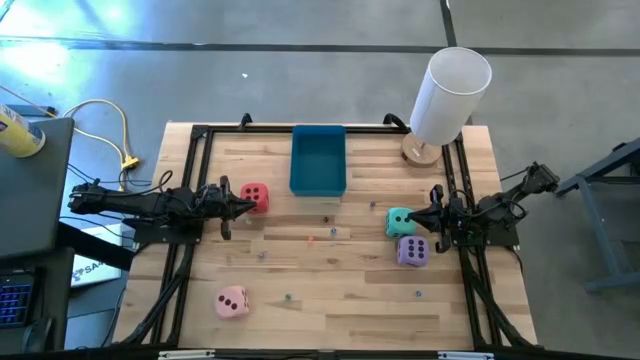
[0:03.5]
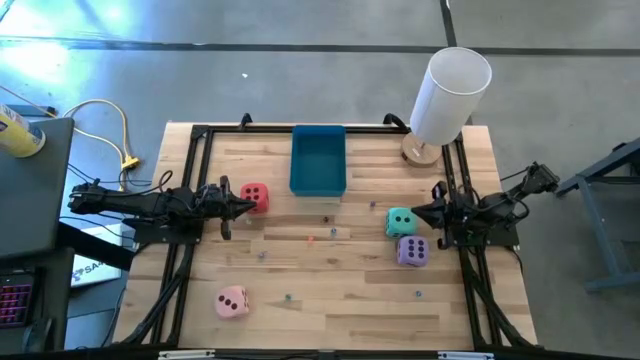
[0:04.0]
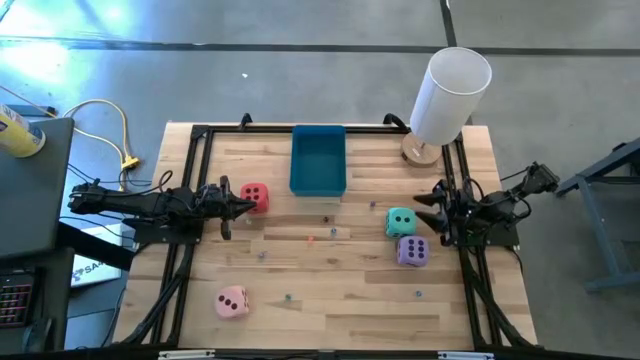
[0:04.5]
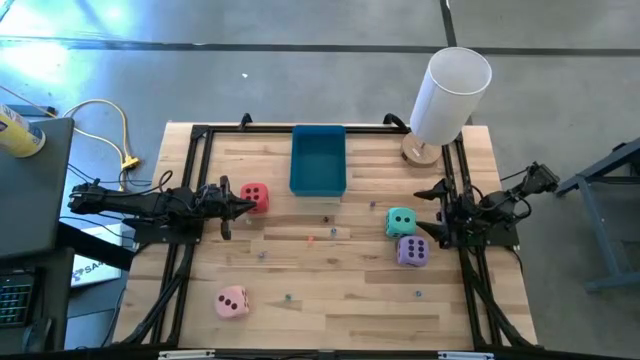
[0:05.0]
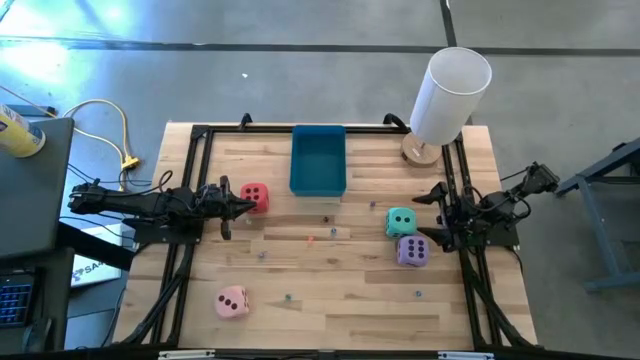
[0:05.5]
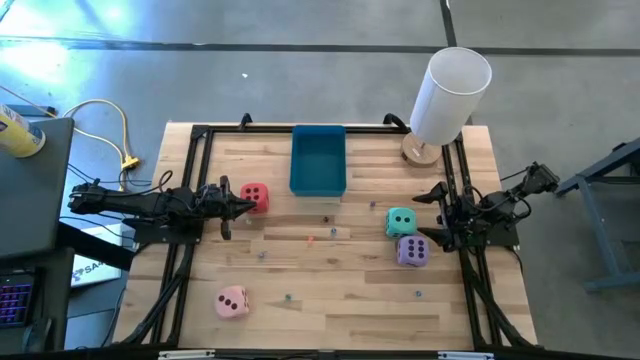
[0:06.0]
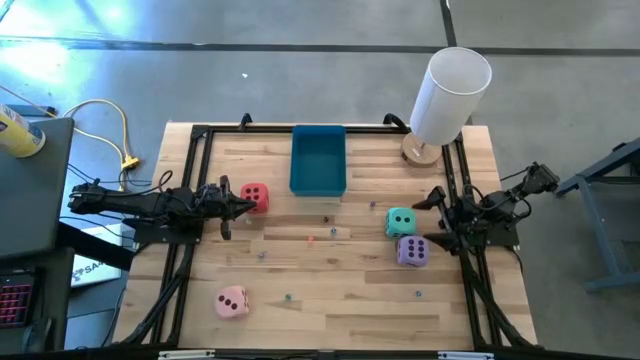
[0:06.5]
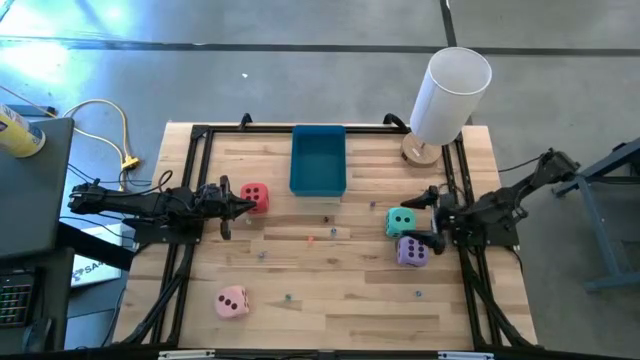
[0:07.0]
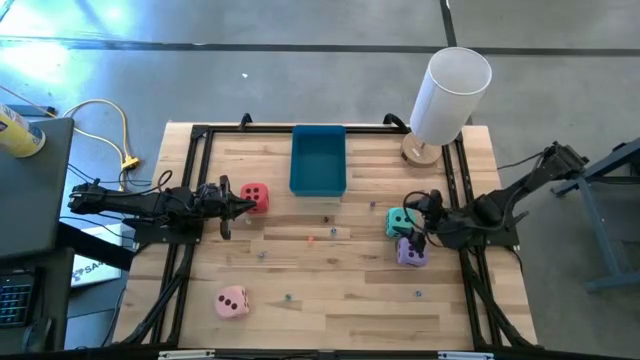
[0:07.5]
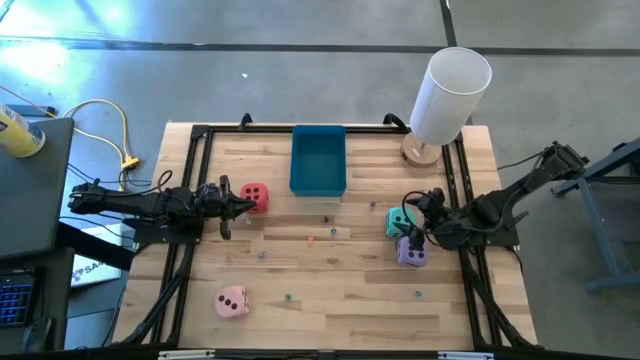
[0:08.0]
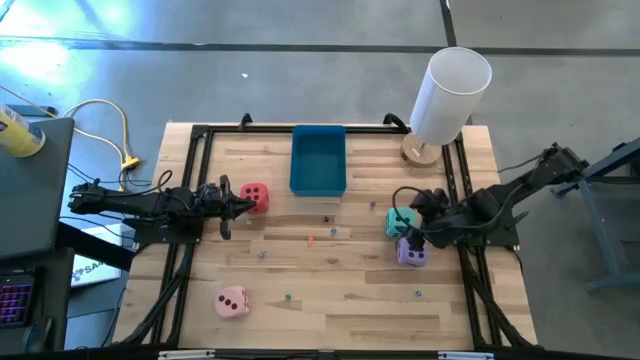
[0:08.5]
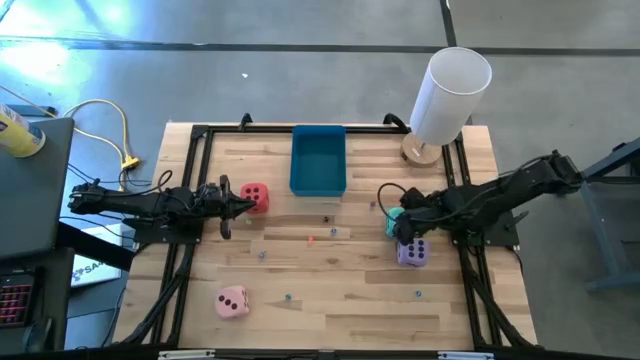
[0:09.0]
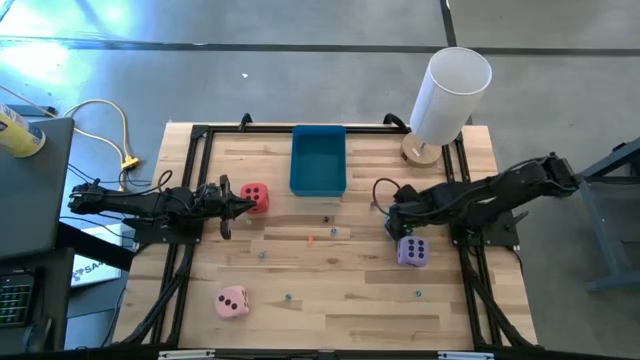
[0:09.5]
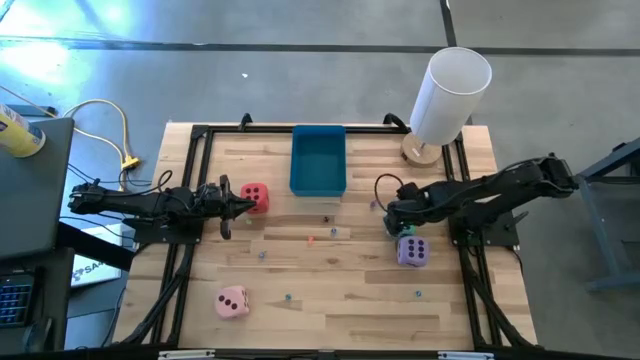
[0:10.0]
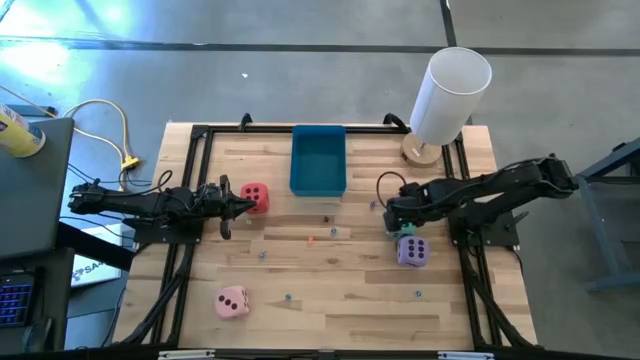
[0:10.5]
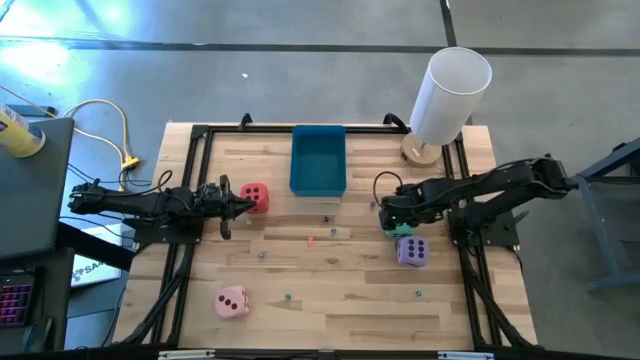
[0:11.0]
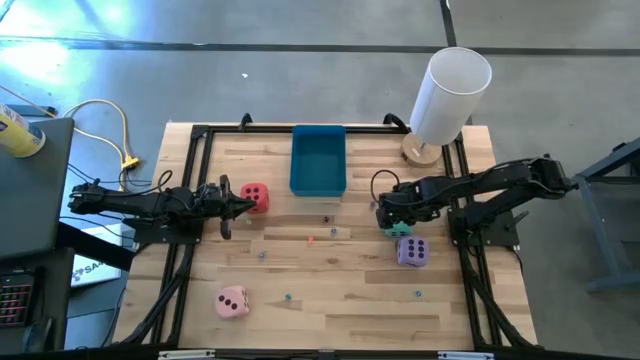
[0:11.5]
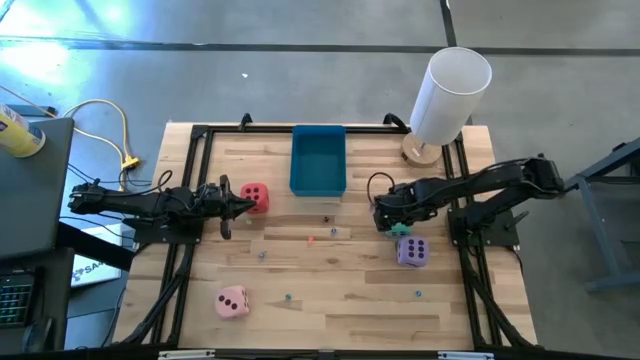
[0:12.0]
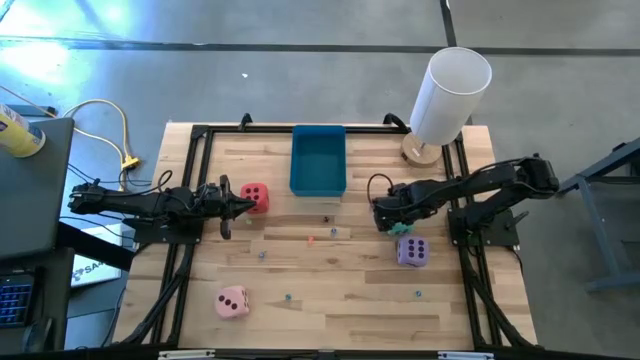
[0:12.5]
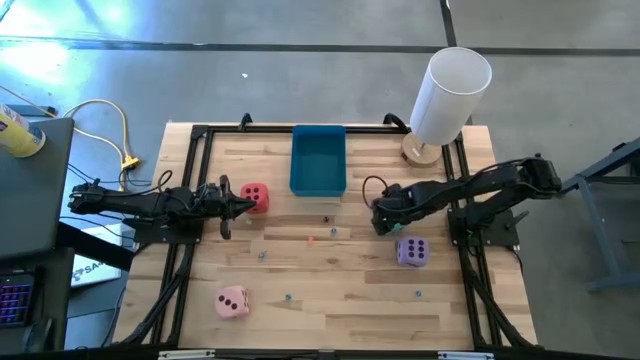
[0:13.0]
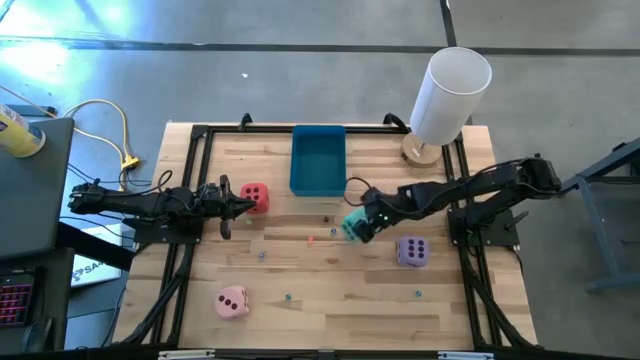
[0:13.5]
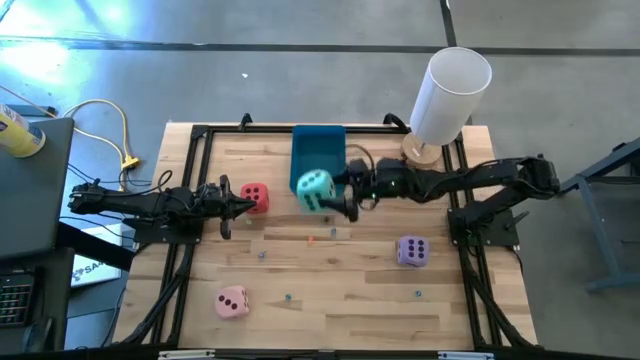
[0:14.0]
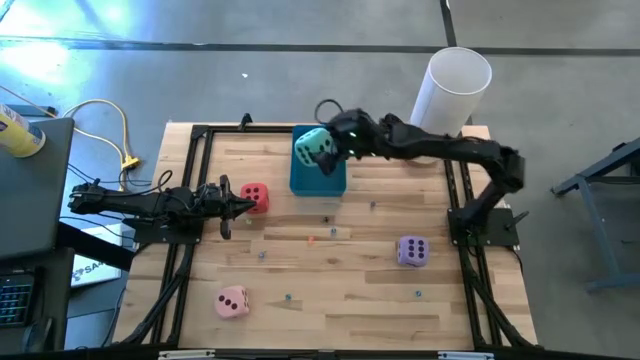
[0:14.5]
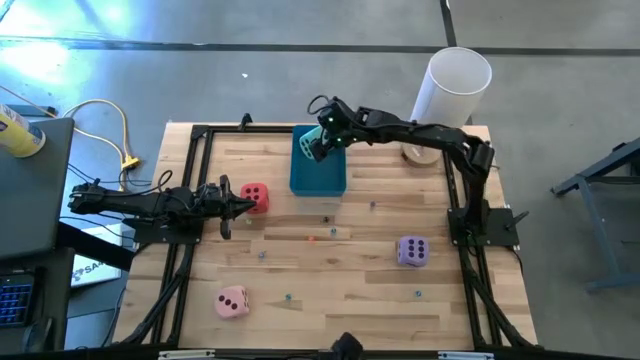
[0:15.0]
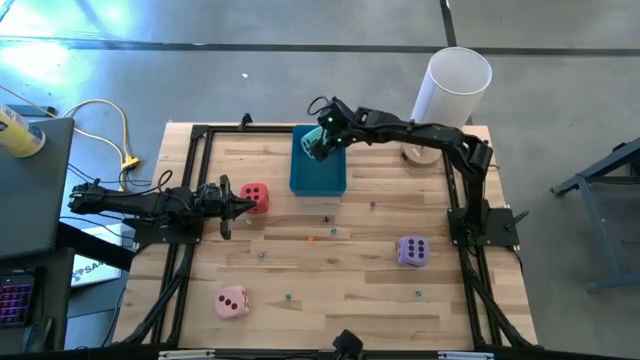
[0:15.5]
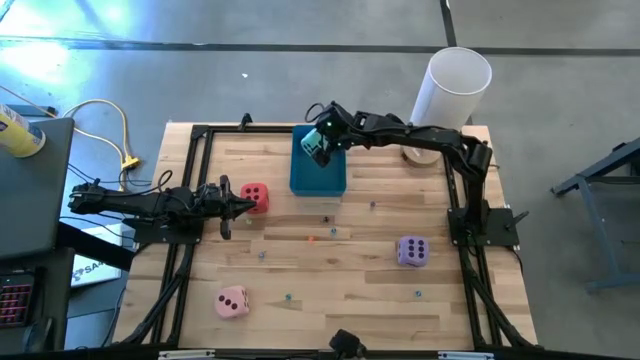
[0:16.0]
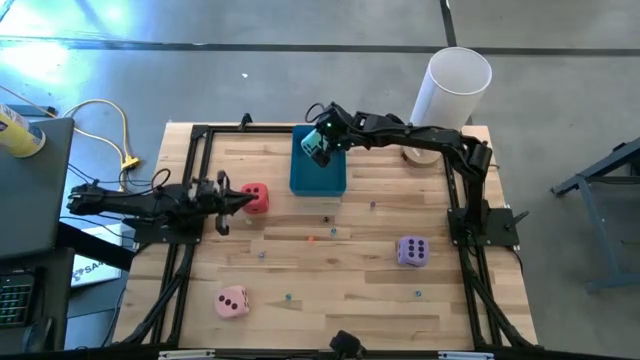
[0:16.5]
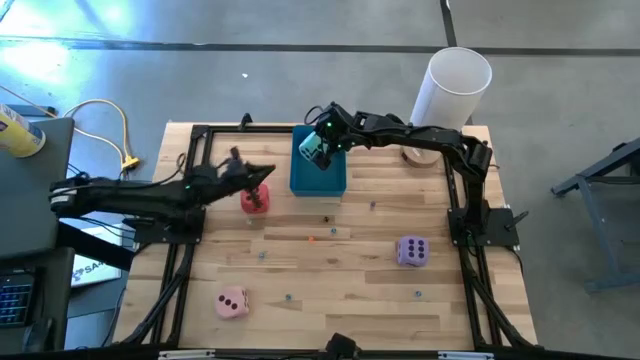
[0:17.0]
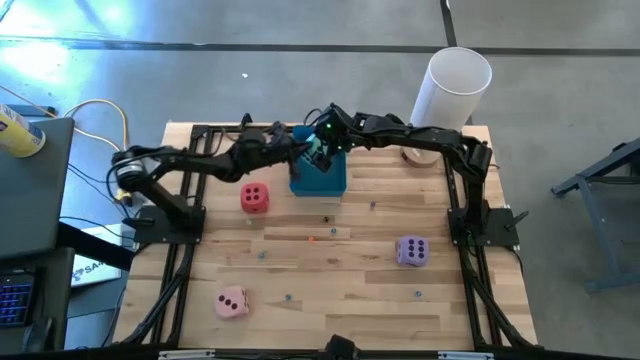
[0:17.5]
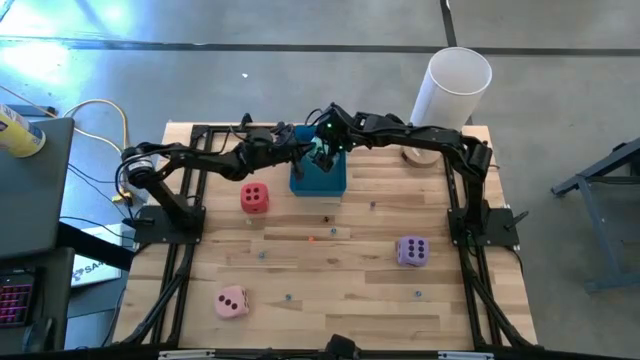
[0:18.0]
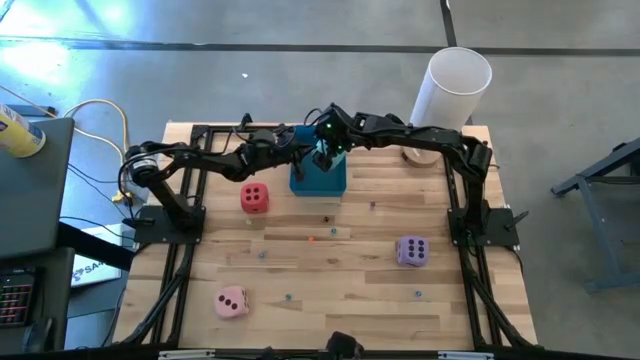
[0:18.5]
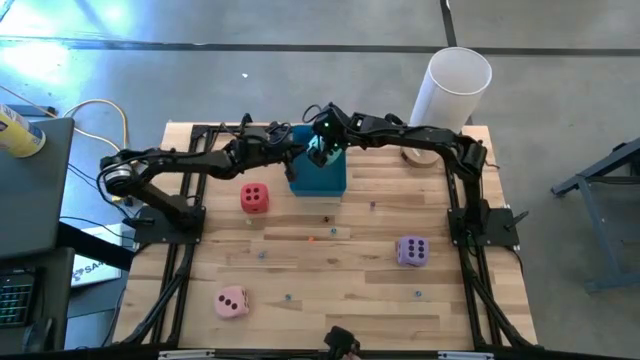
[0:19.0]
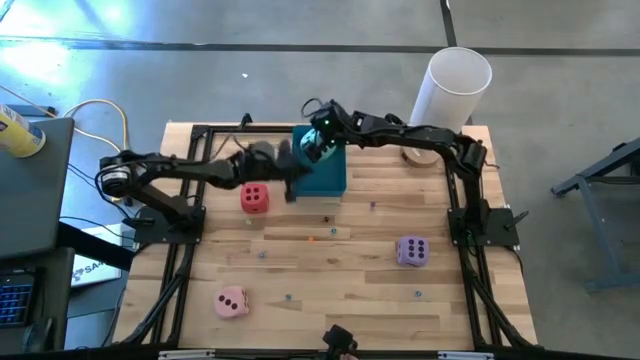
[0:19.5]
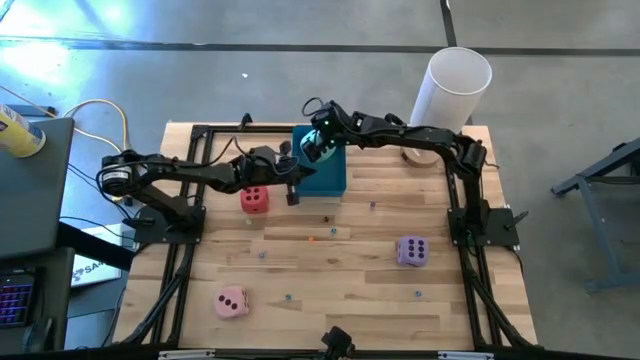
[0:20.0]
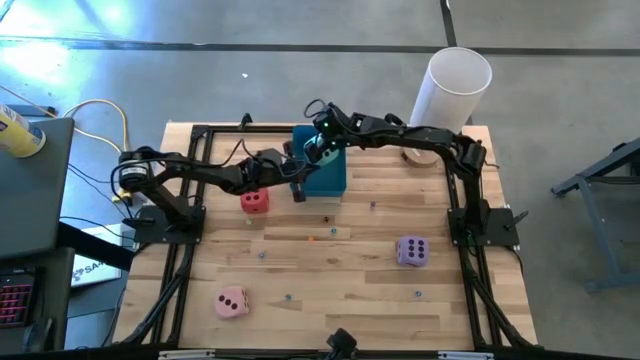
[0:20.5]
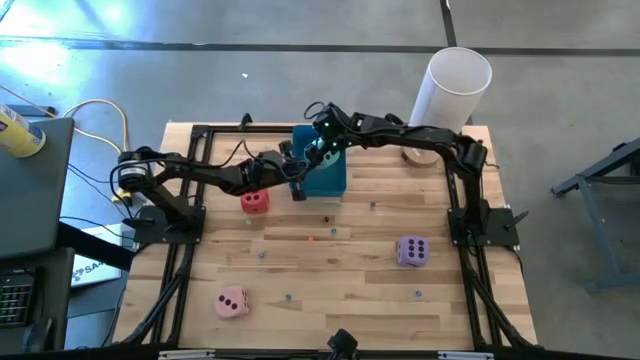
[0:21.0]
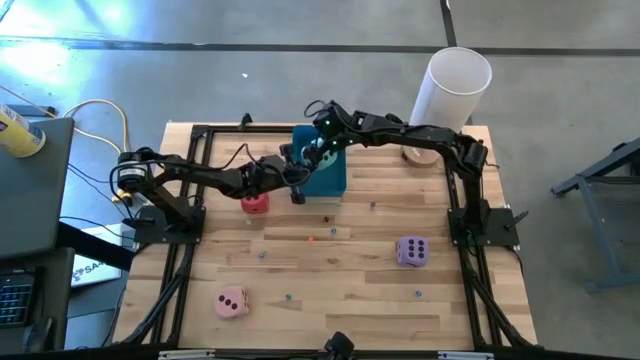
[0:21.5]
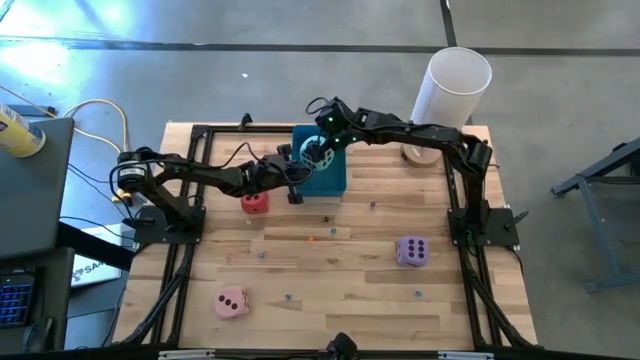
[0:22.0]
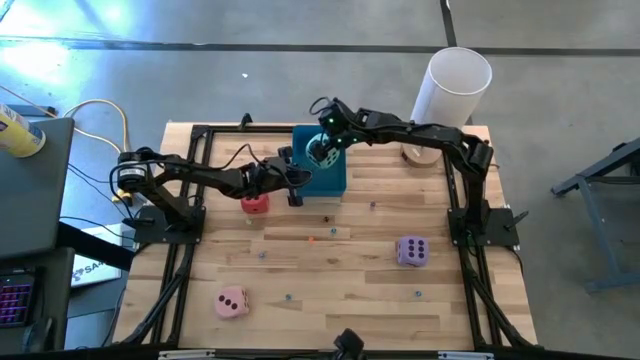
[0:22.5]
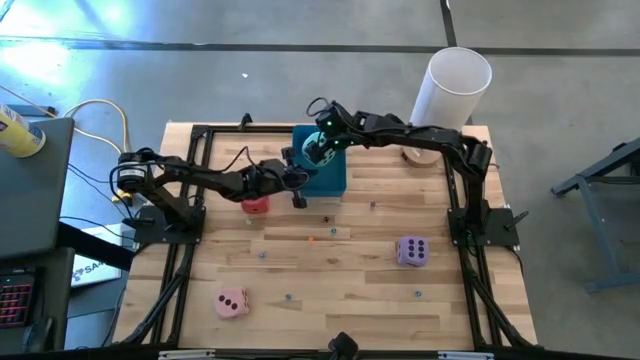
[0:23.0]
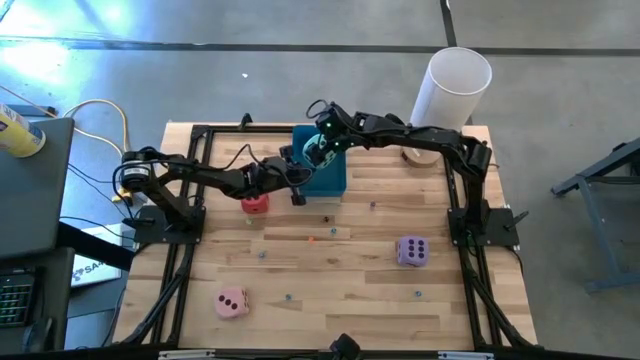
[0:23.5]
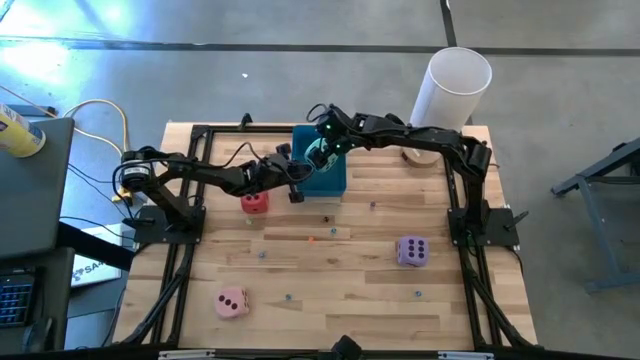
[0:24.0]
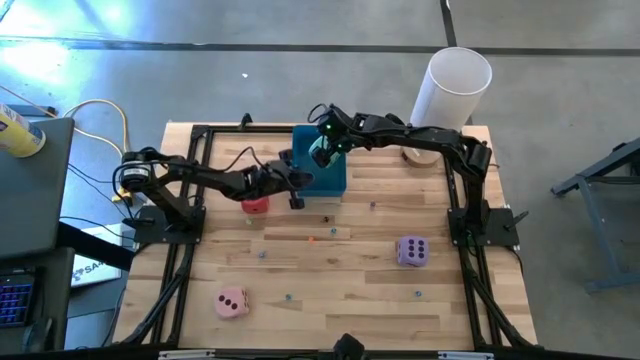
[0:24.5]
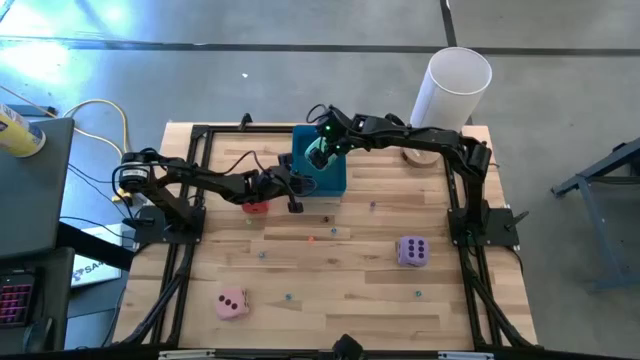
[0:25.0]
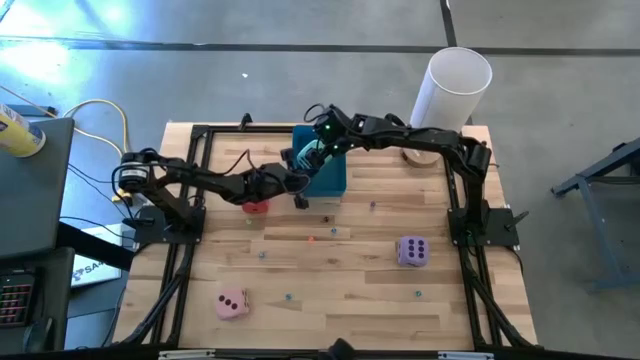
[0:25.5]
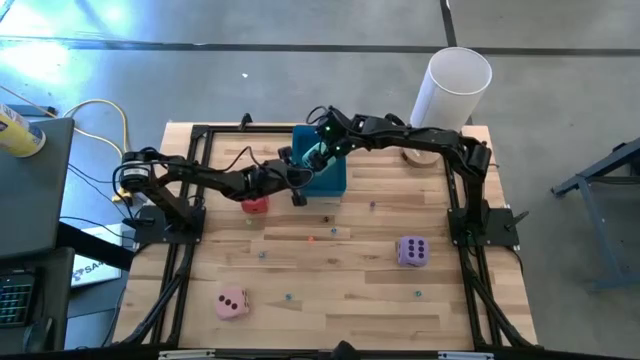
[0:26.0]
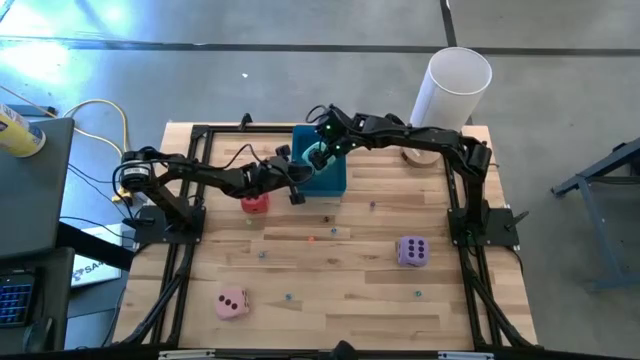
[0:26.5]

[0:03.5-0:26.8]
Task: Pick & Place Dice
Put the big light blue die into the blue bin
